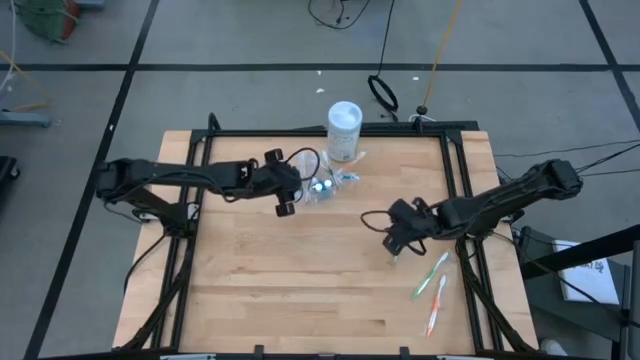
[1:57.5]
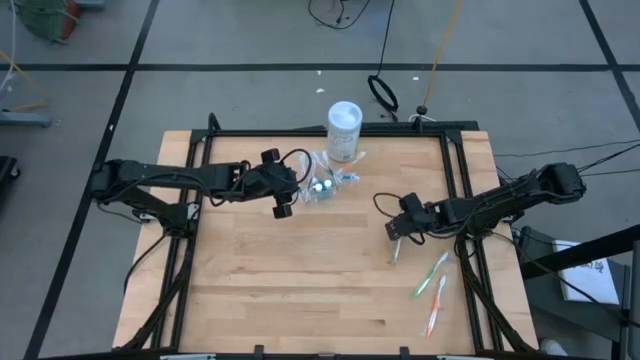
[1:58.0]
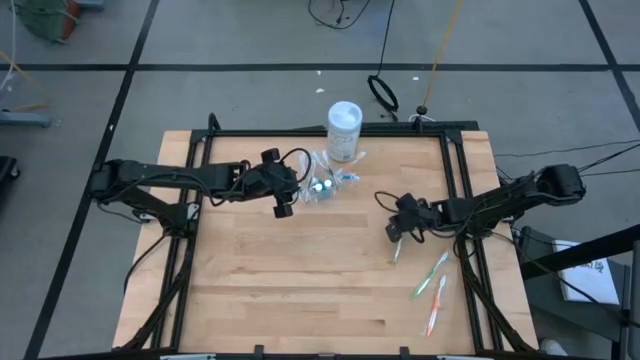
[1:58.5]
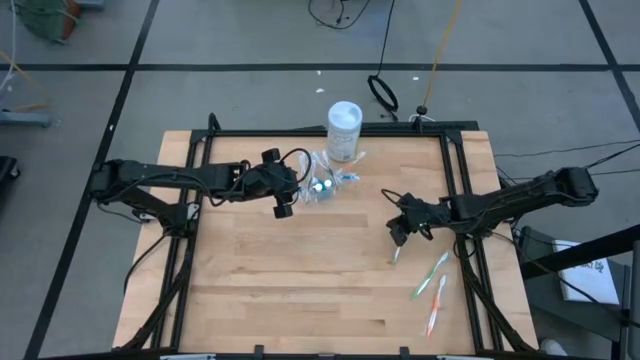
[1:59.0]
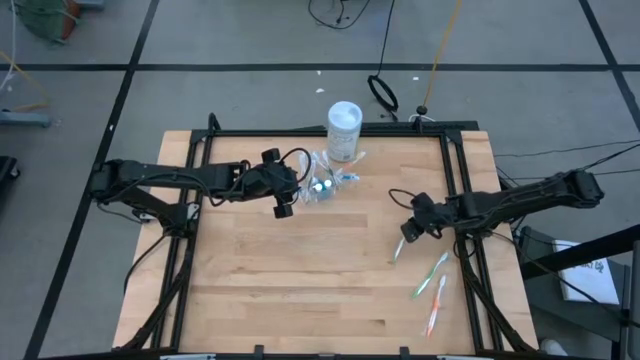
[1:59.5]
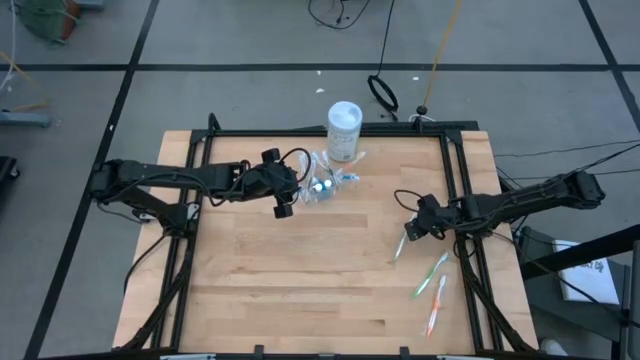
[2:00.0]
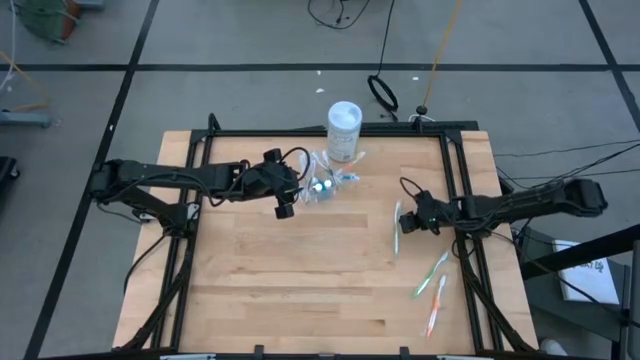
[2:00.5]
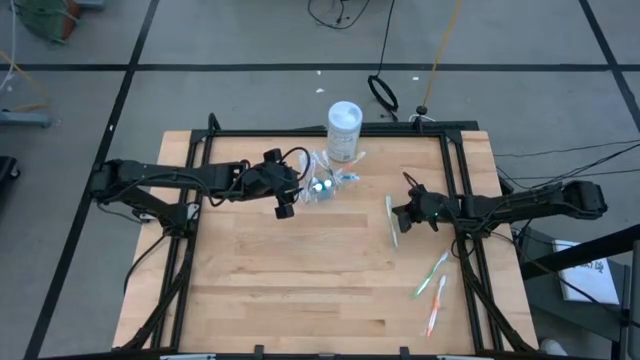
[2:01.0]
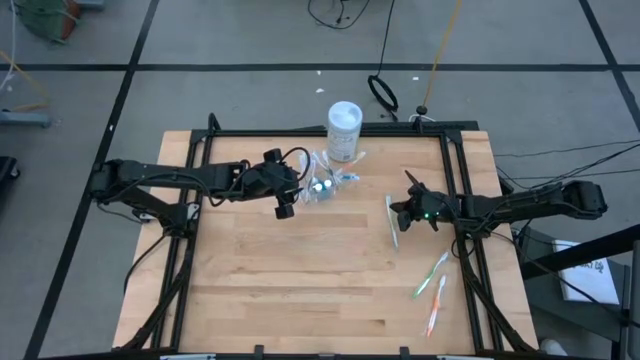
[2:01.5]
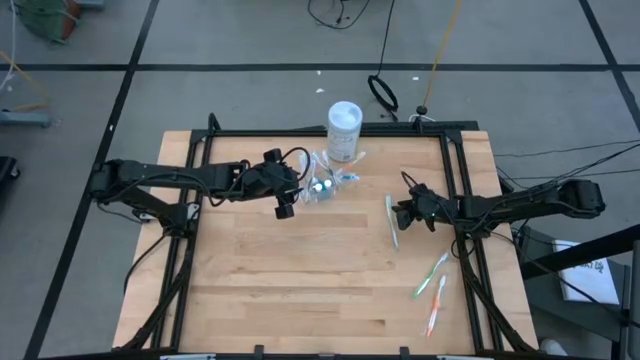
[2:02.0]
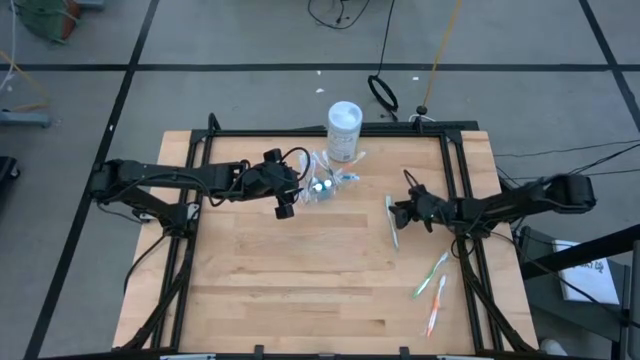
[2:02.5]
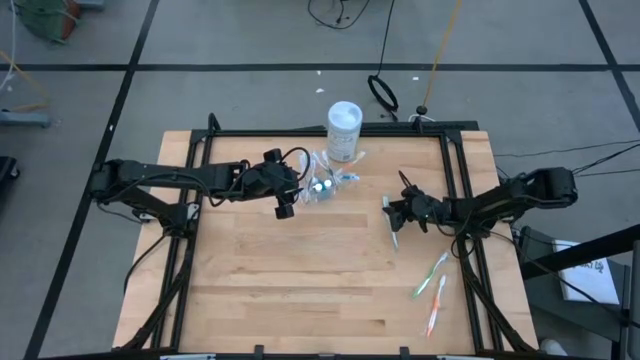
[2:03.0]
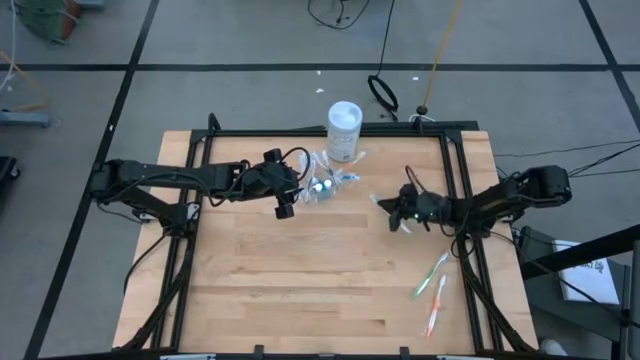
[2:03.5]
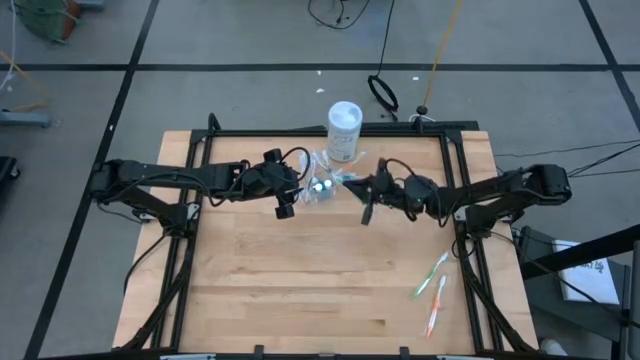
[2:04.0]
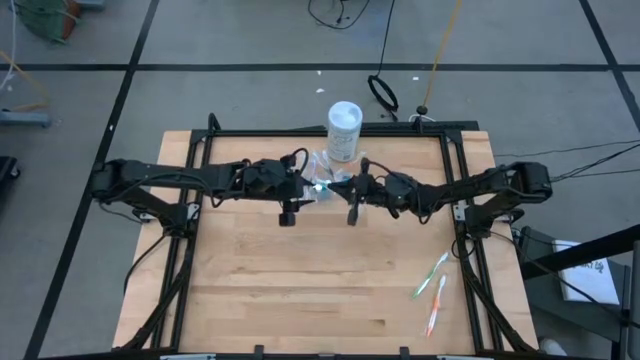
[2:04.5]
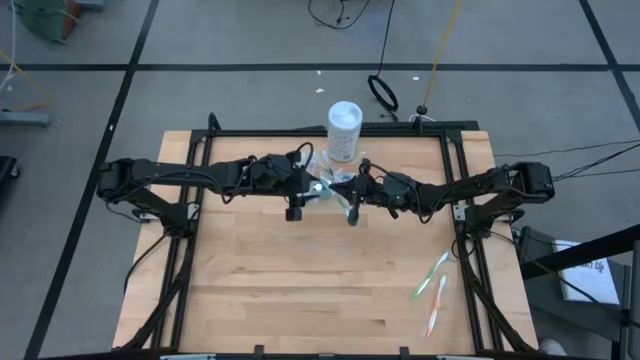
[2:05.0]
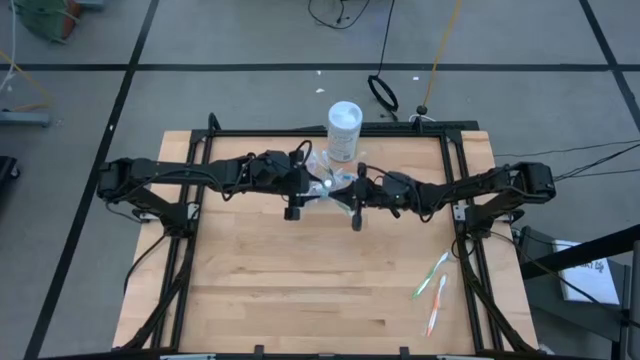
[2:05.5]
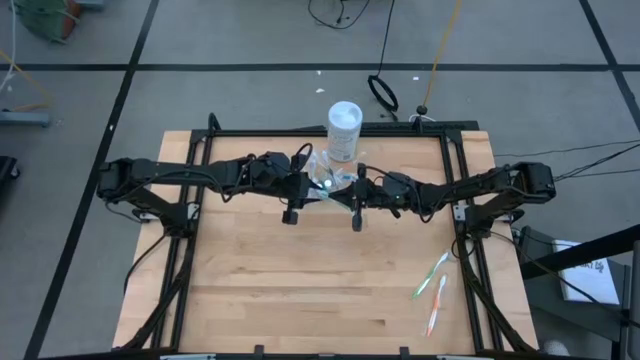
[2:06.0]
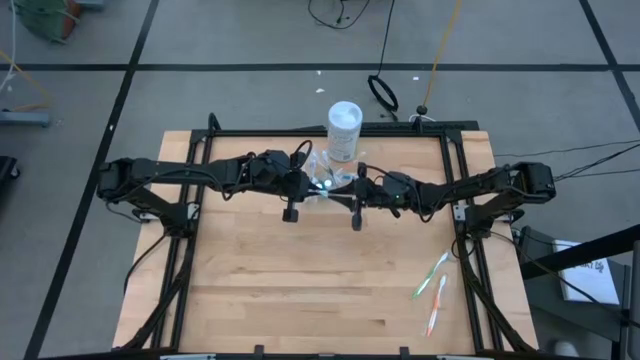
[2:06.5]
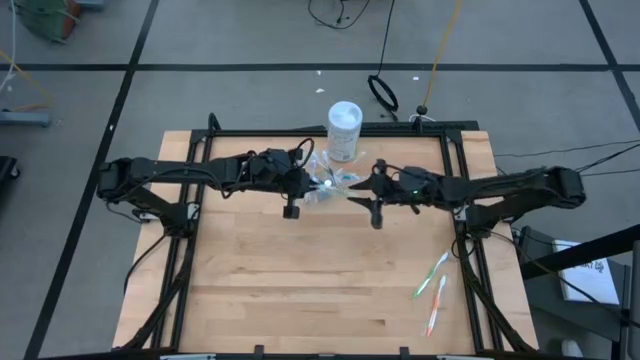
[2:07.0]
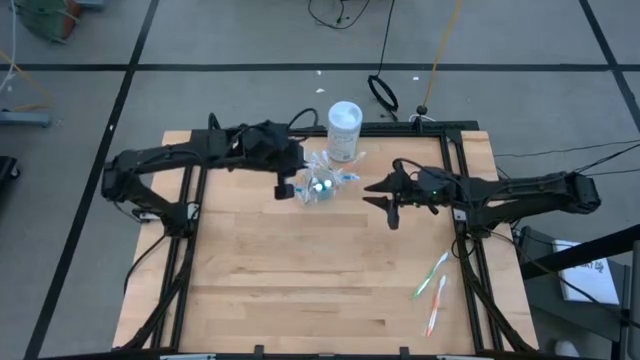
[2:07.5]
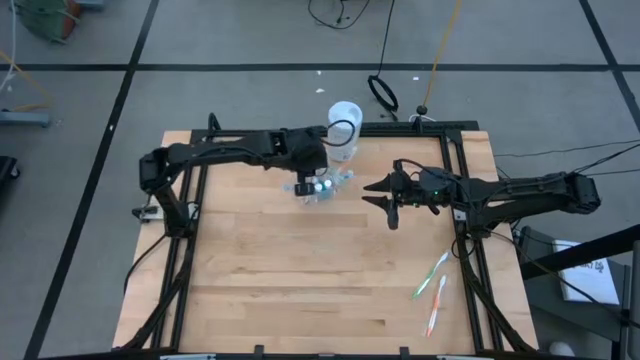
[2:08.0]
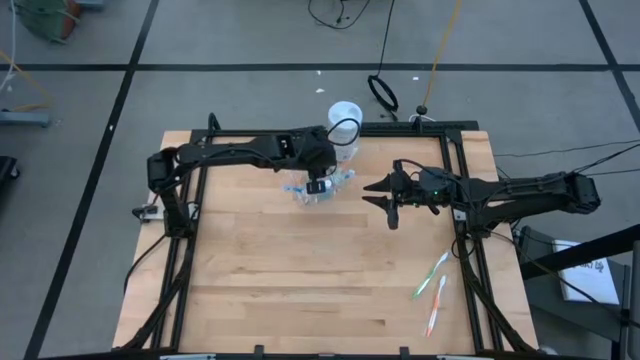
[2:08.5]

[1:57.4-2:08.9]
Task: Pick & Place toothbrushing station
Put the green toothbrush into the transparent organizer

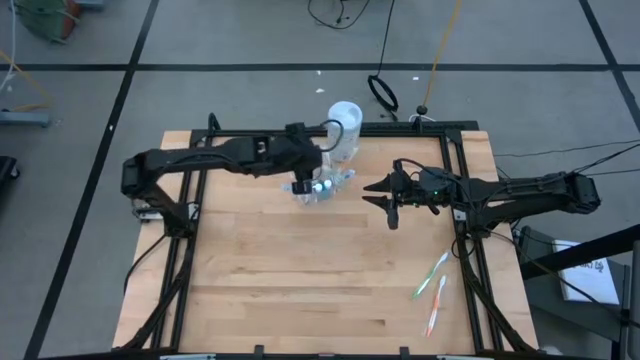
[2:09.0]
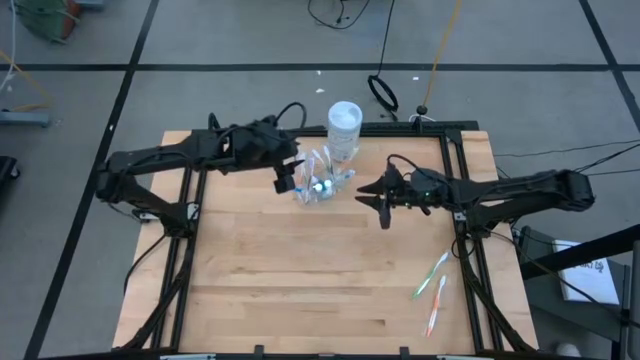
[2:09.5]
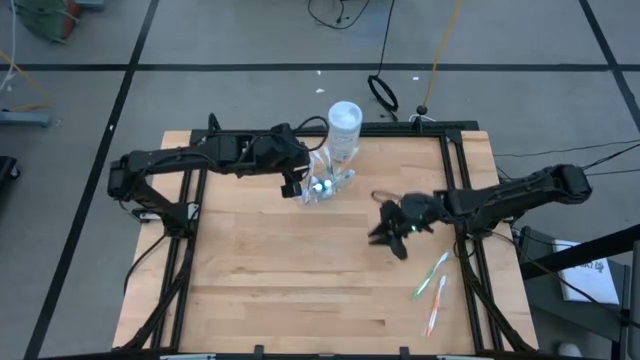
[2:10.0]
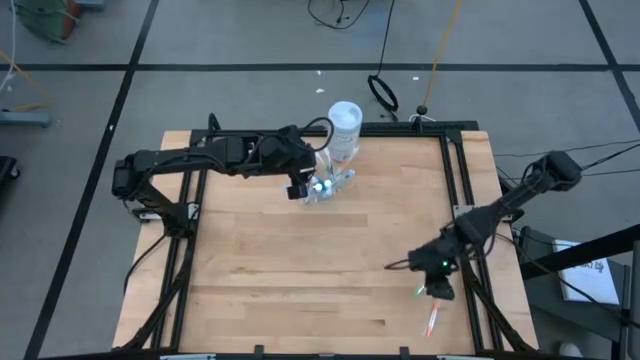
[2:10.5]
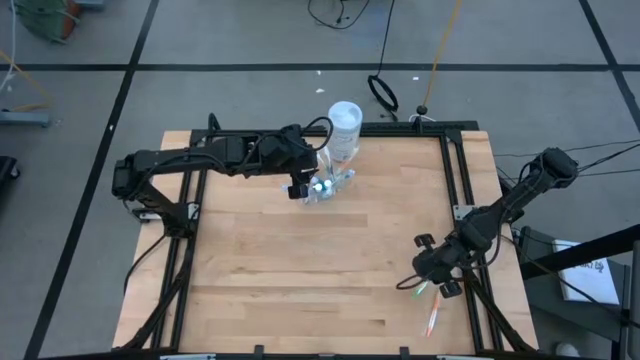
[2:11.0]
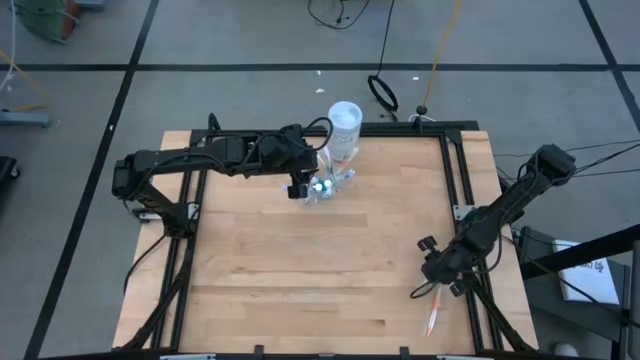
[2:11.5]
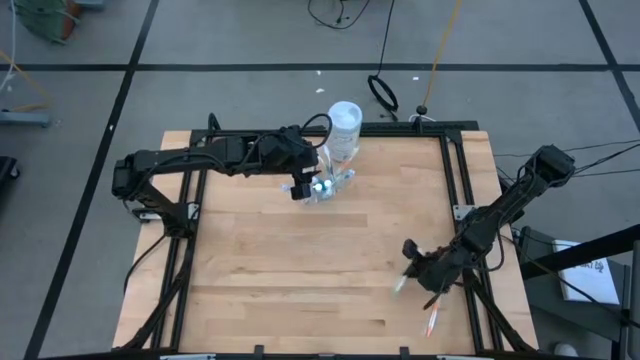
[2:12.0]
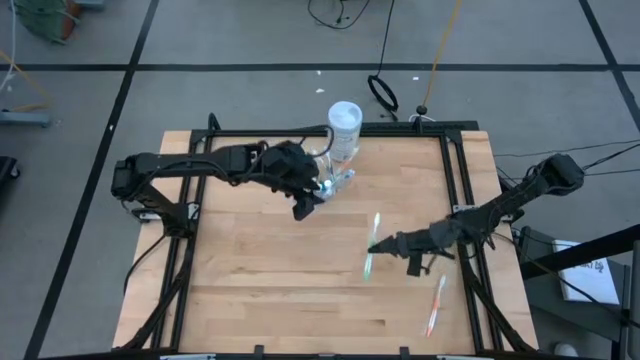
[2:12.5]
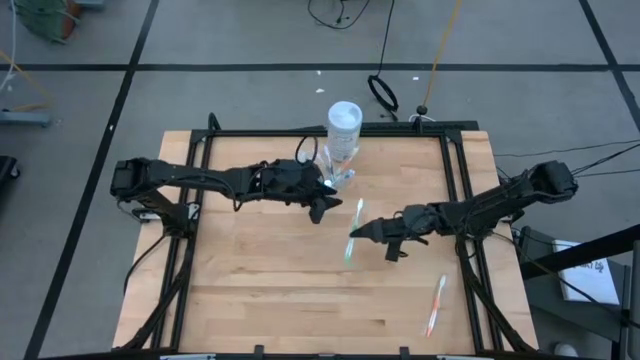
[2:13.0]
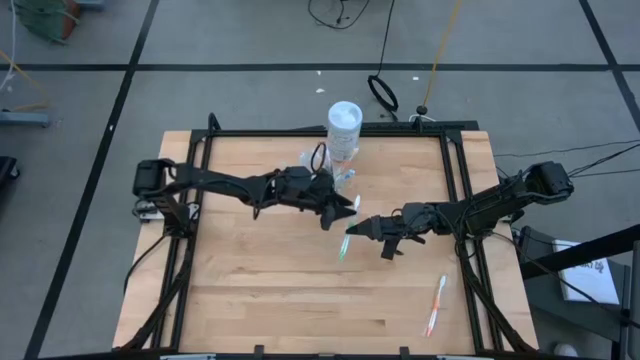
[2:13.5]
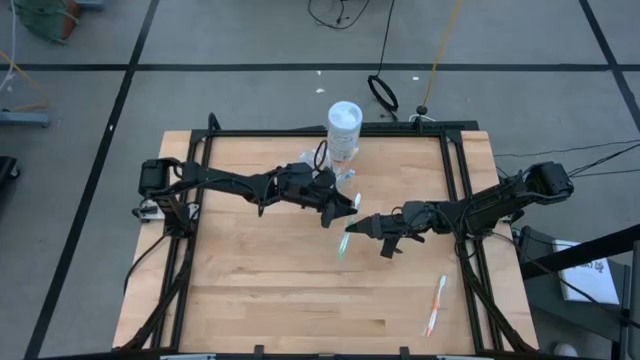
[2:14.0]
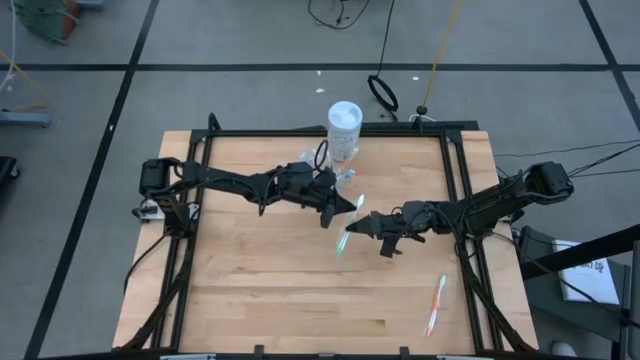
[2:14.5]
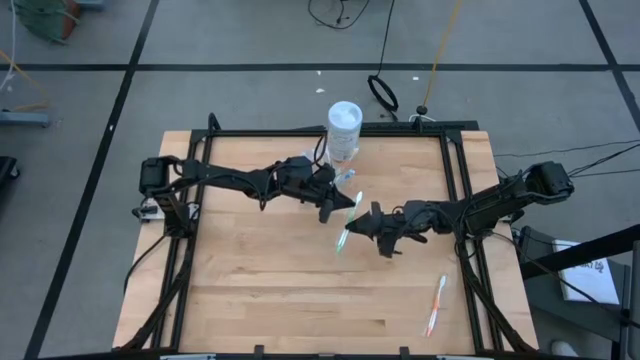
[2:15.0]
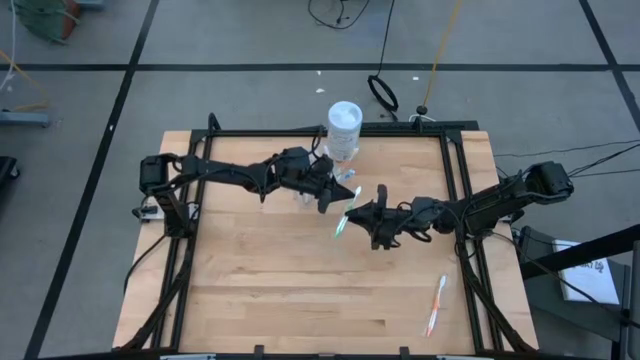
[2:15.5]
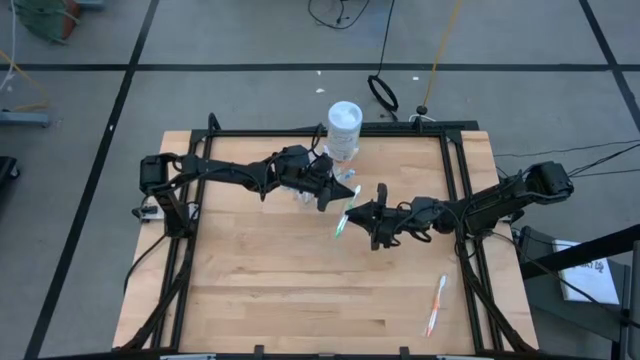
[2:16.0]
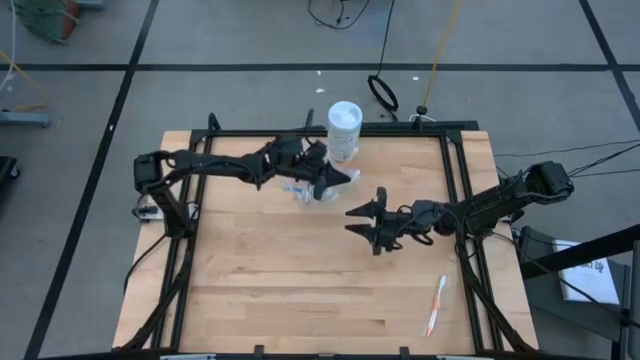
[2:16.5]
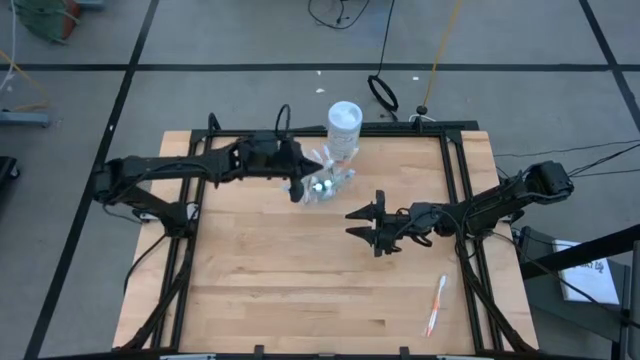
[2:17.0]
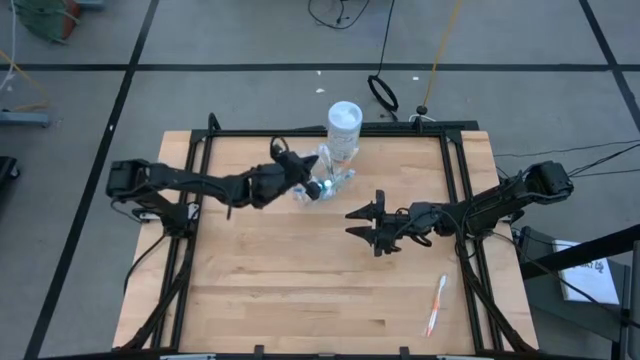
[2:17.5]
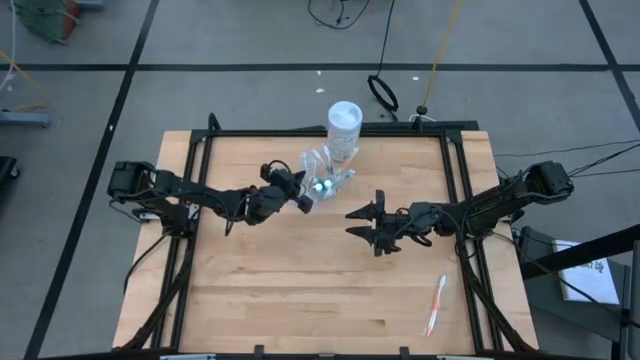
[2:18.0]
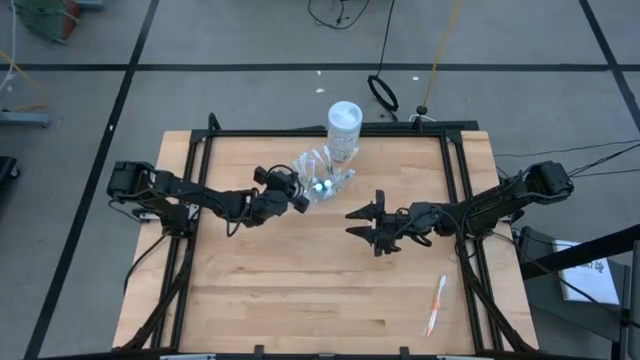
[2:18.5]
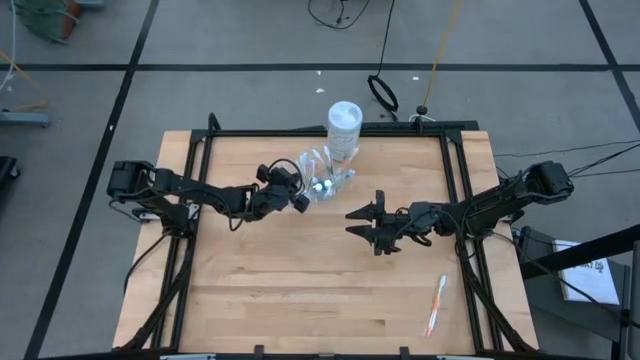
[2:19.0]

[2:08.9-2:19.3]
Put the green toothbrush into the transparent organizer
